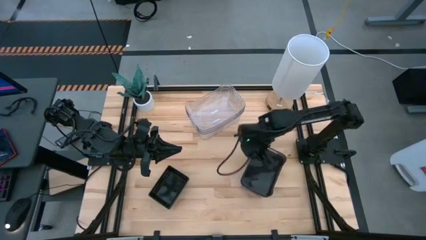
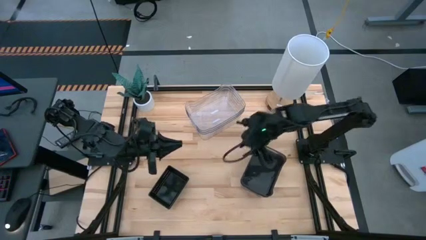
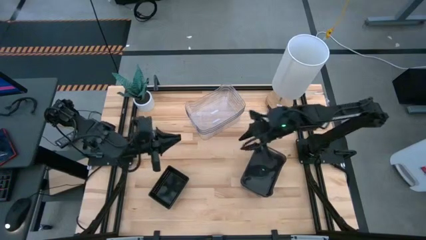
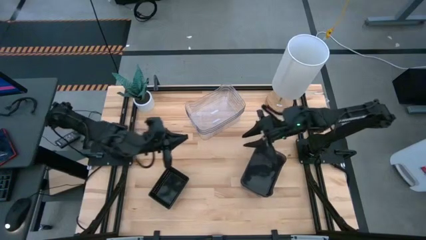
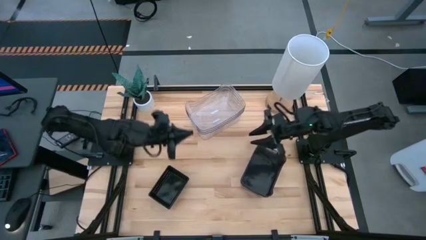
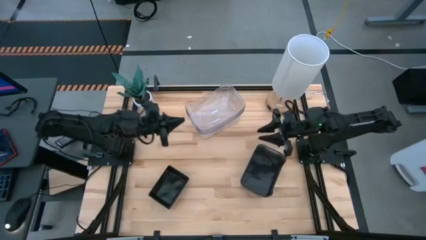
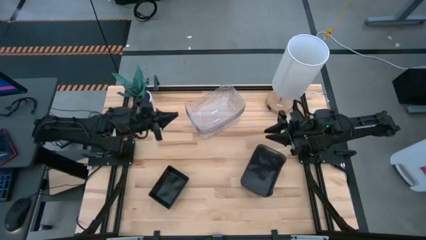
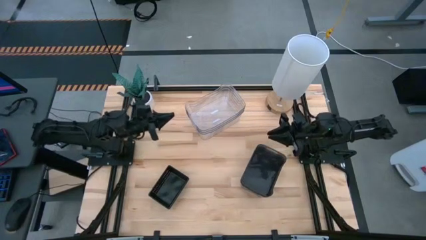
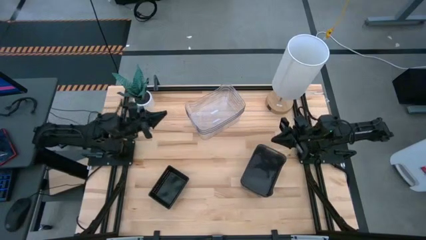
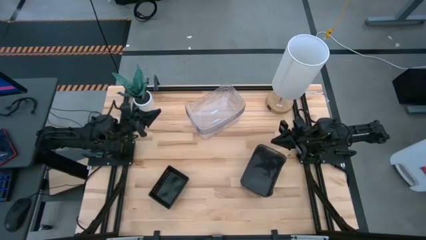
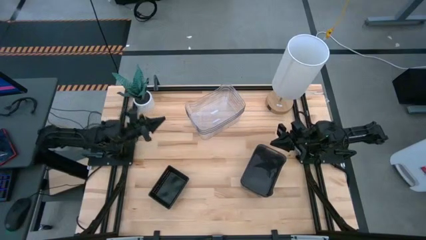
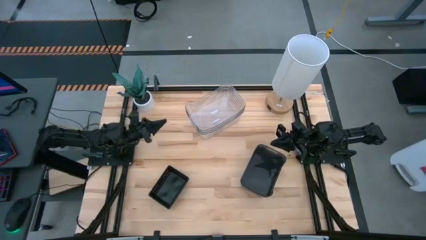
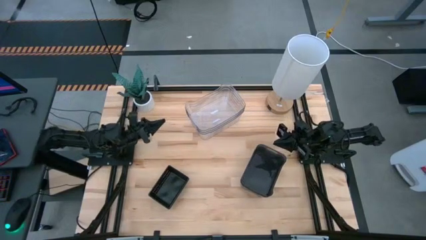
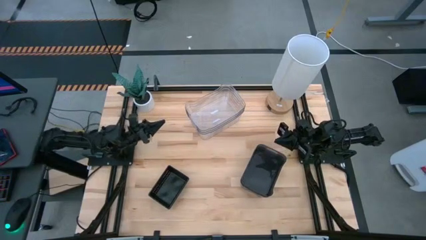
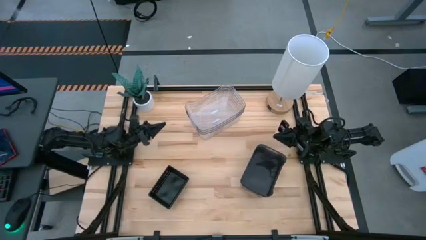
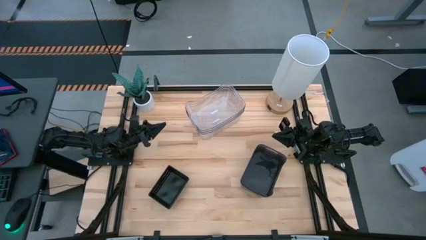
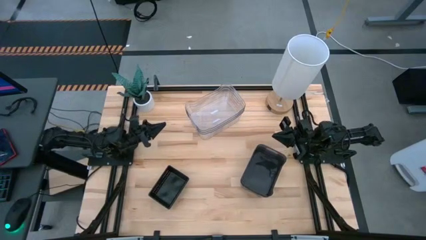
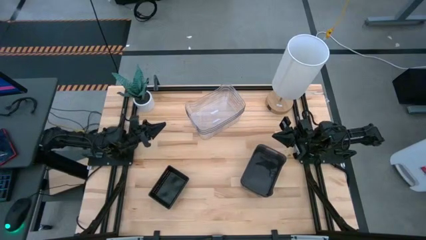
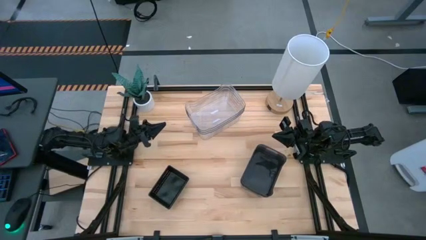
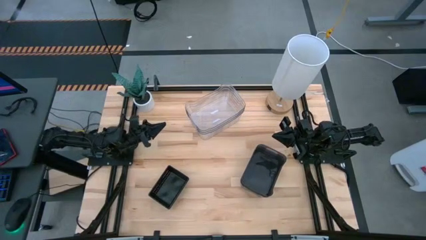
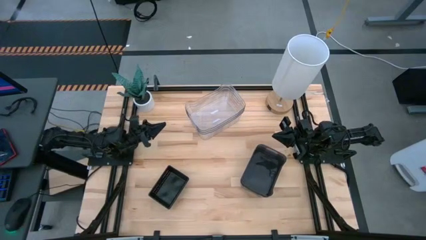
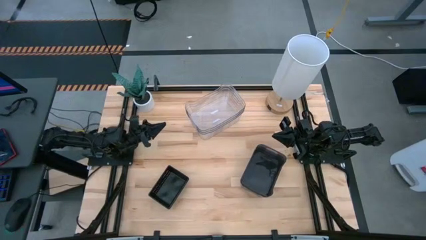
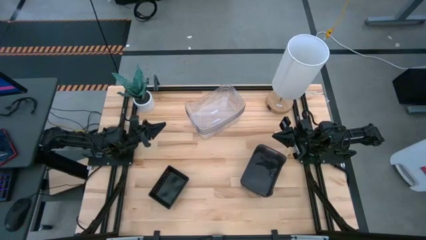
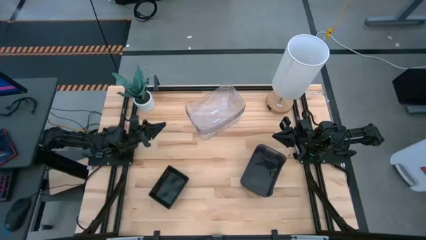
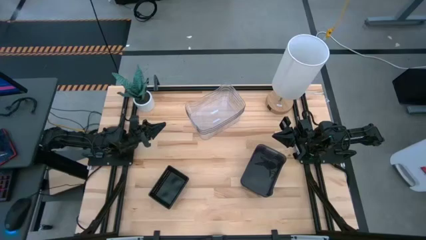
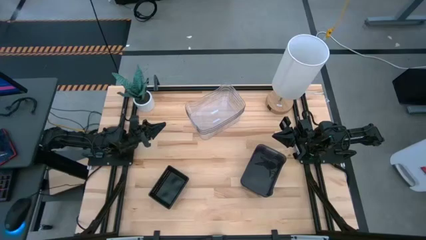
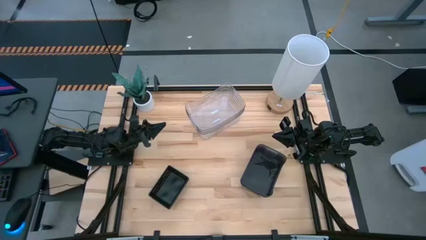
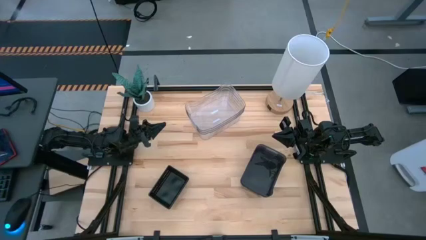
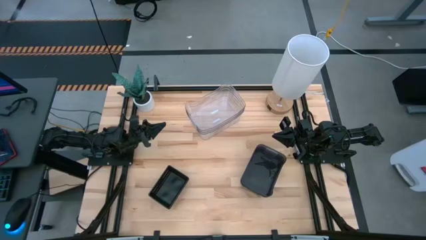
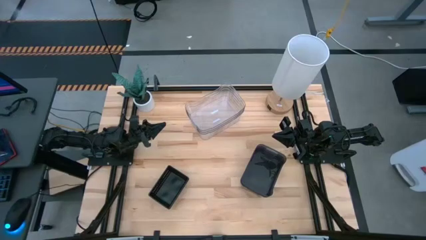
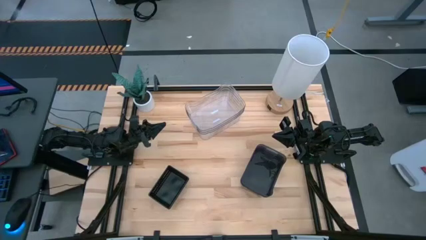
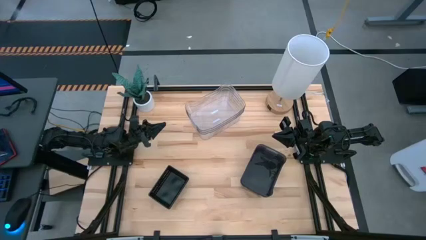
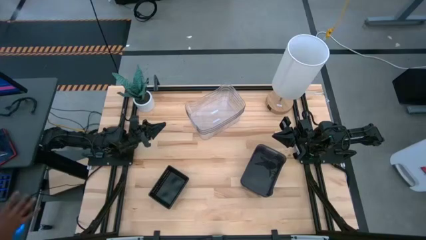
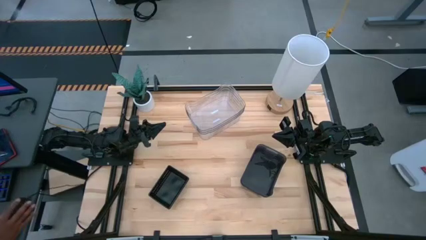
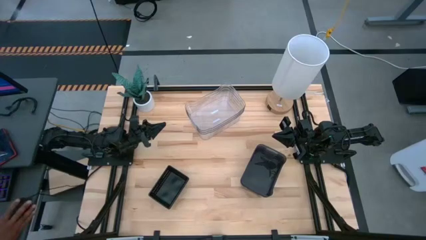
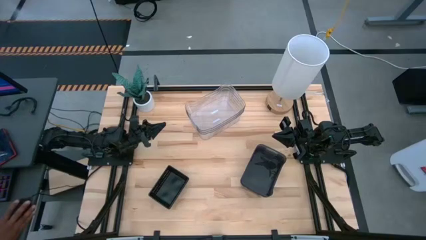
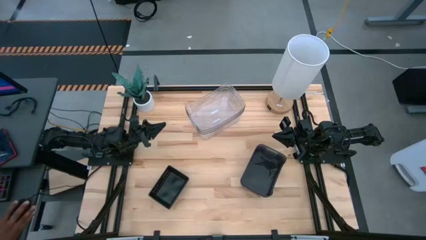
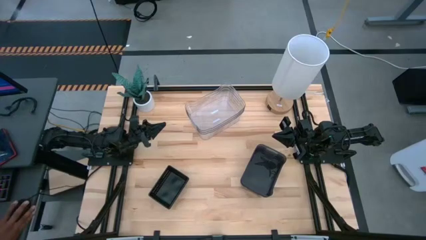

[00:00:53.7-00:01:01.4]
Return to Home Position
